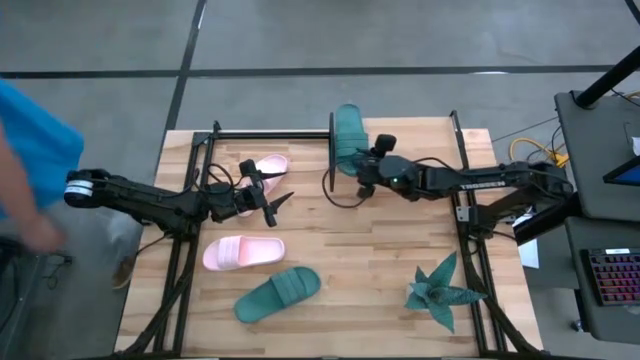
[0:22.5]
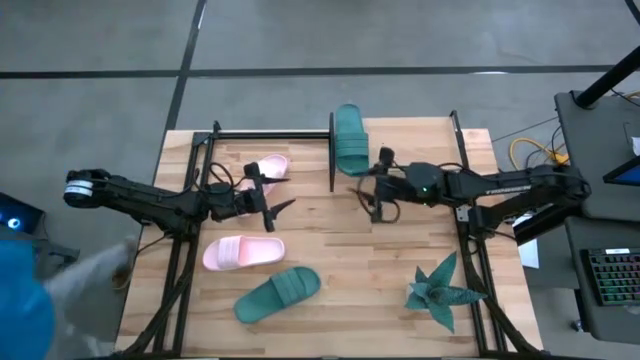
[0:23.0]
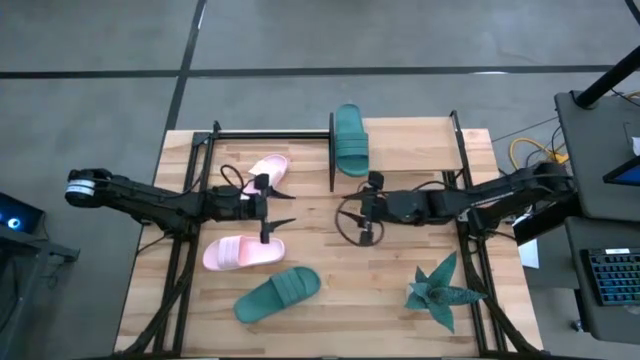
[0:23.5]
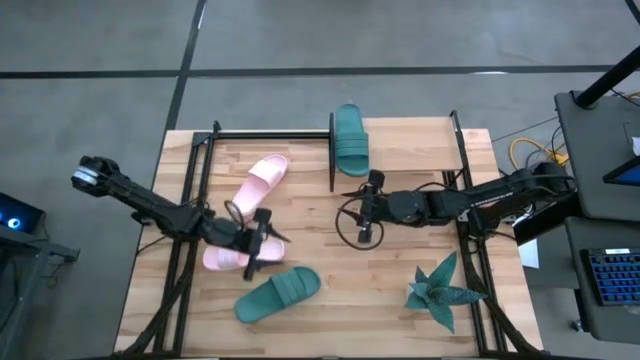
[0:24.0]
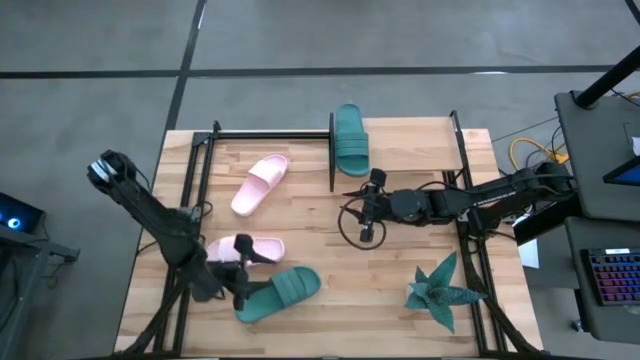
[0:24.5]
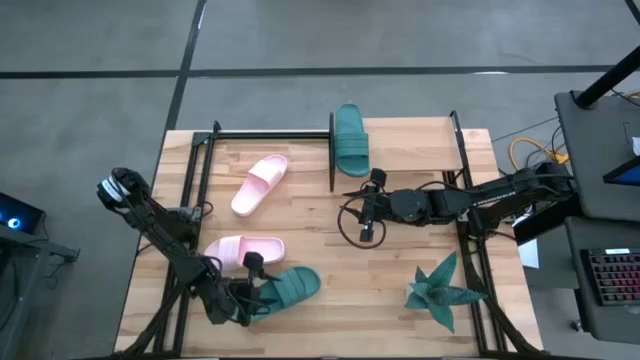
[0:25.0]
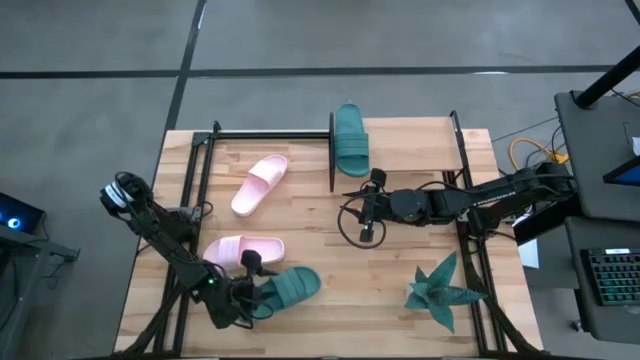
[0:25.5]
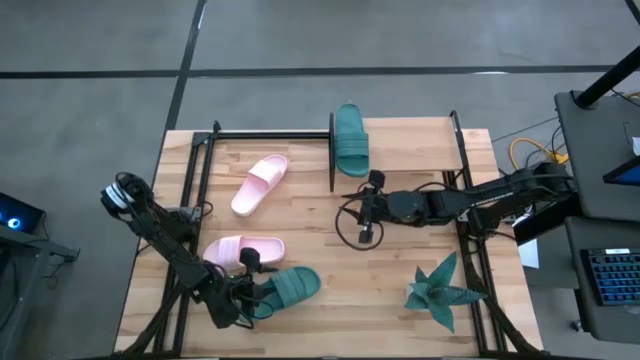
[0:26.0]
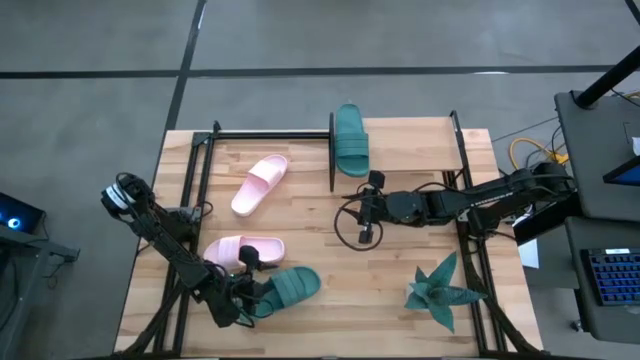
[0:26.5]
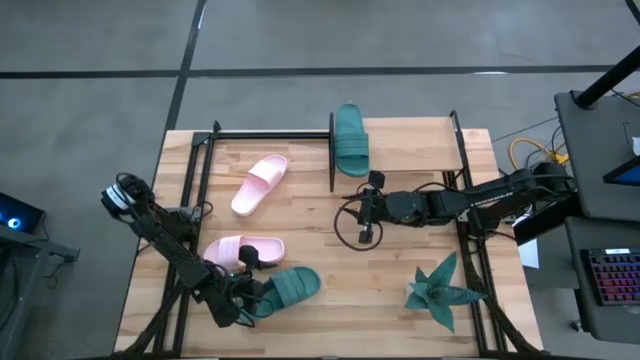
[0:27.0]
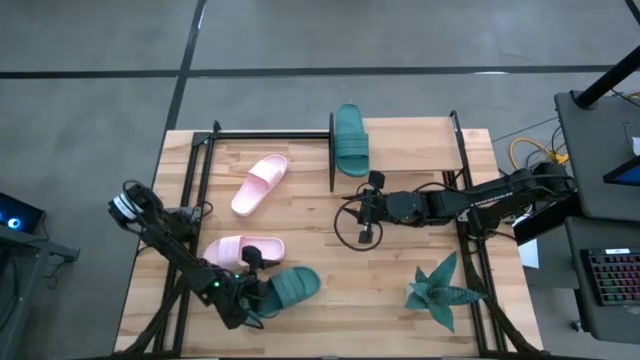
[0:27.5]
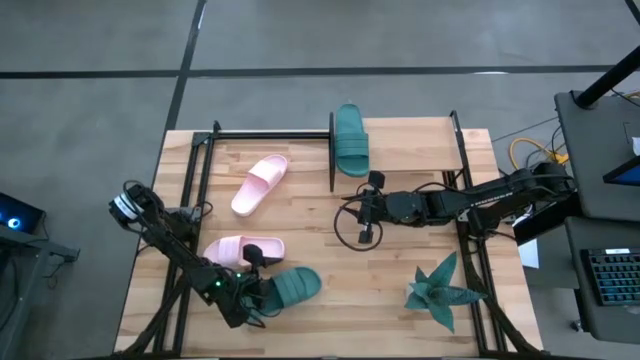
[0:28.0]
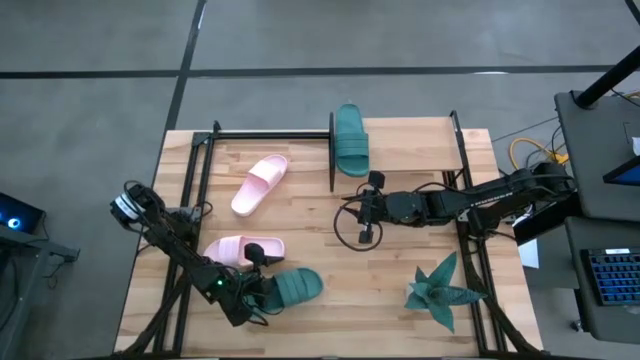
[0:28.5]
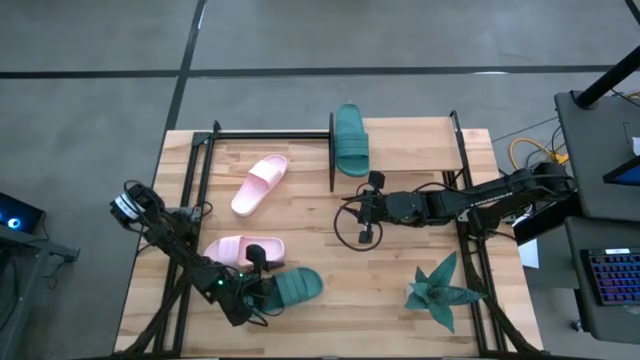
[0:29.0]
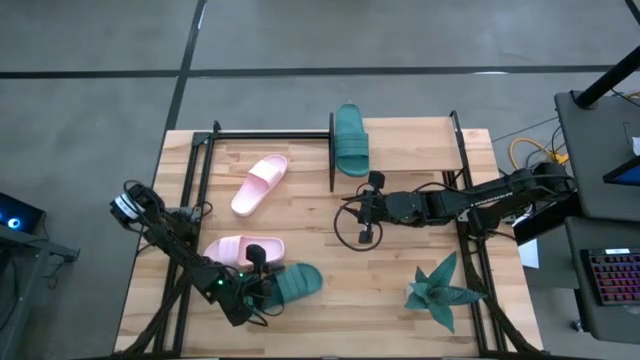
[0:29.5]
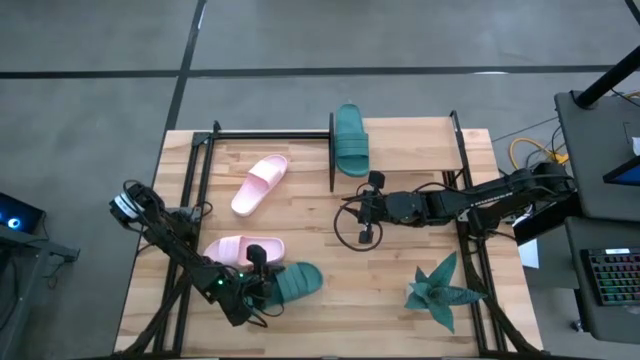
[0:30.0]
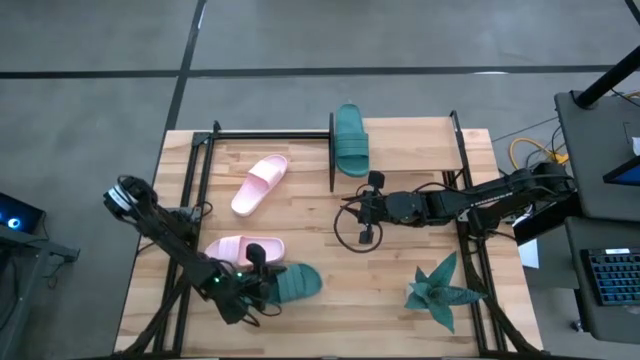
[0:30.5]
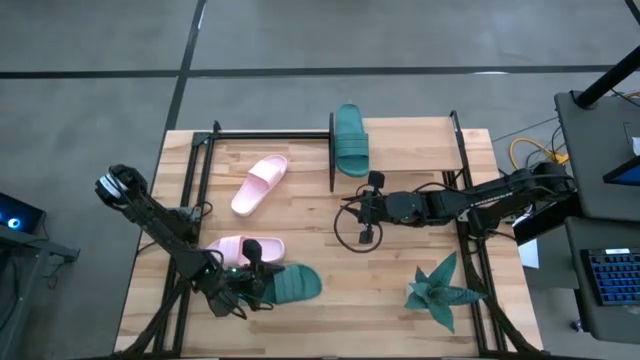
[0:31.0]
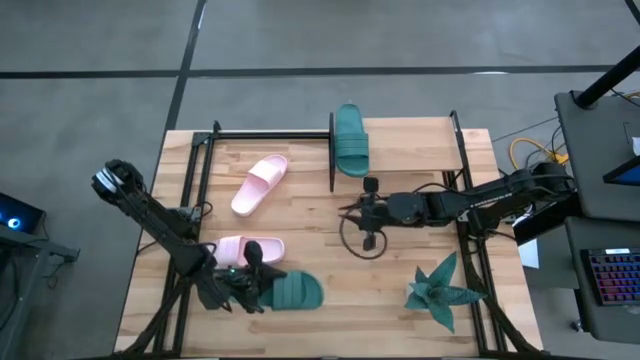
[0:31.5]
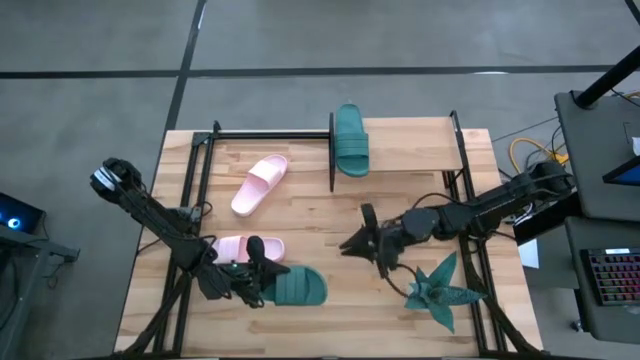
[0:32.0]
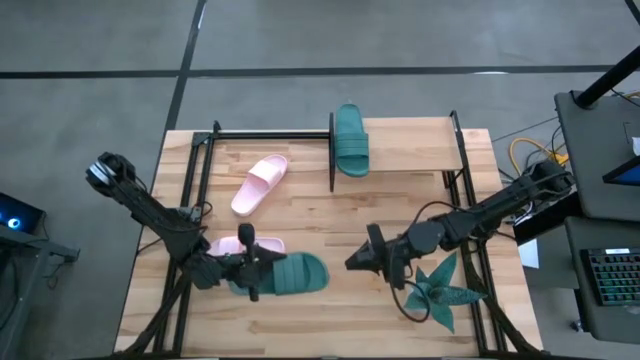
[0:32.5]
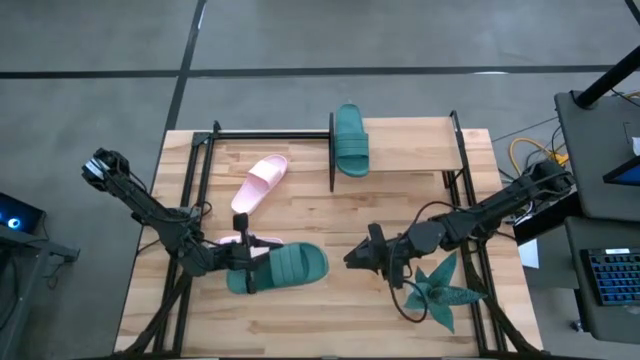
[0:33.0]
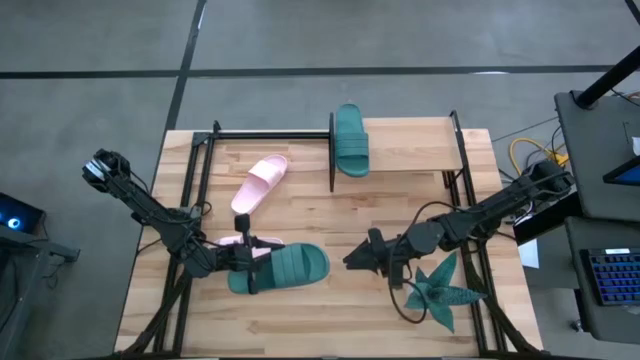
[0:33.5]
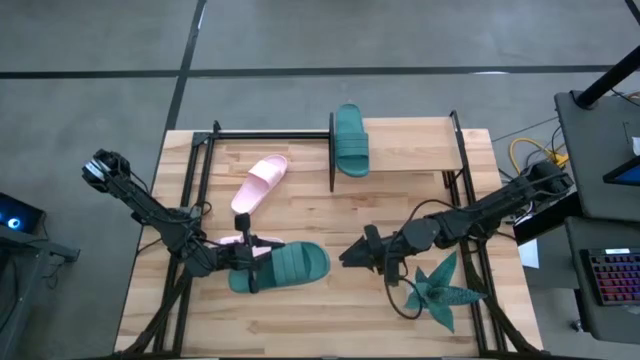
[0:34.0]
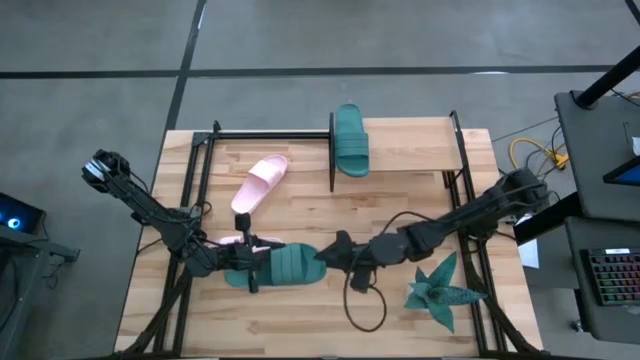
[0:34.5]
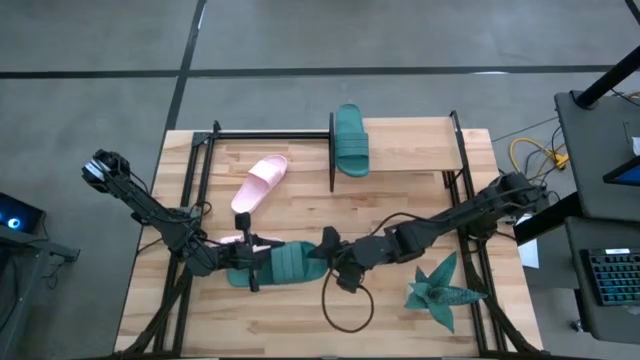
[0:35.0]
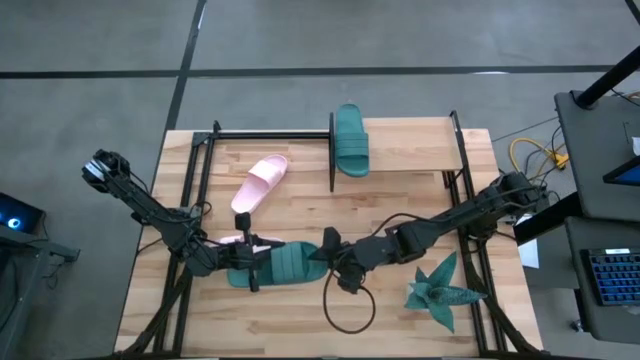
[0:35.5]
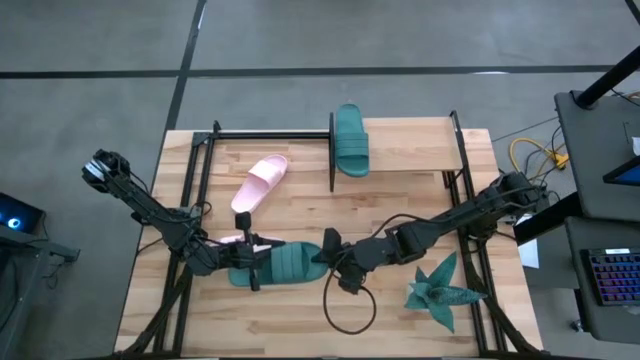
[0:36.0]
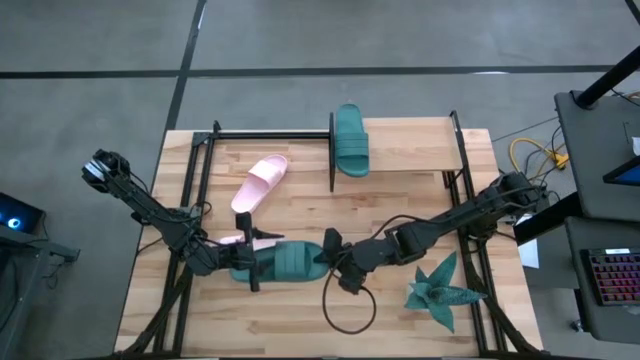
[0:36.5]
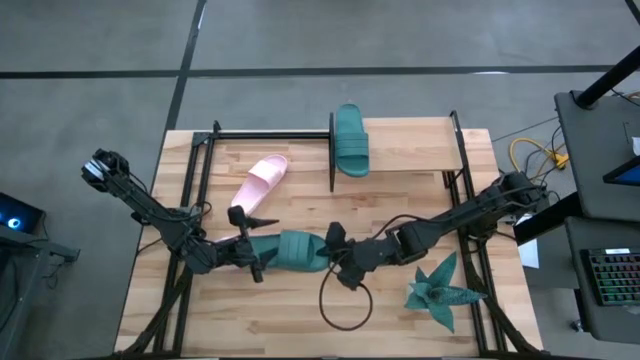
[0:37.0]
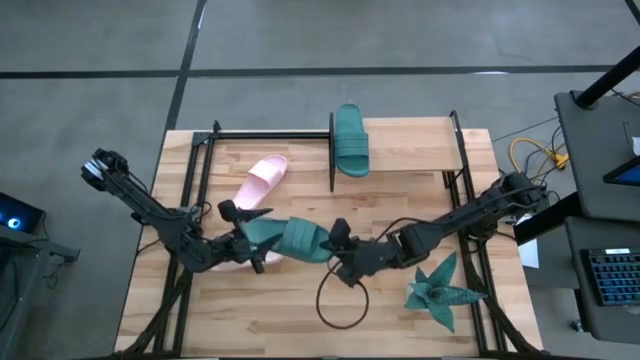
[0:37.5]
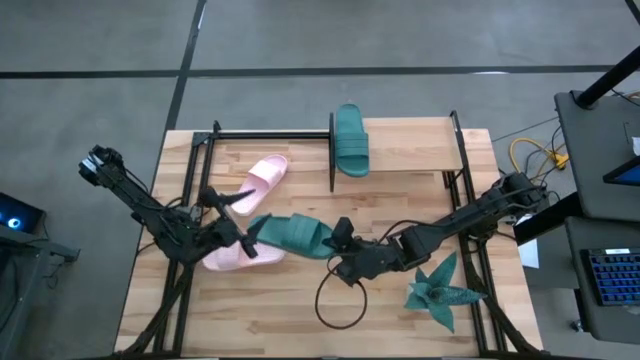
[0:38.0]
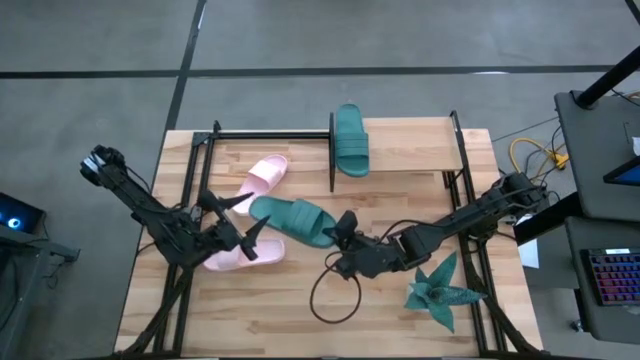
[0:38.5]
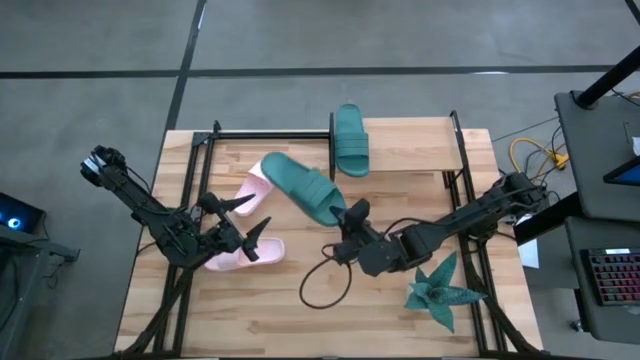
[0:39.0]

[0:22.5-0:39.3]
Task: Pick and place slides into the shelf
Put the green slipper on the shelf

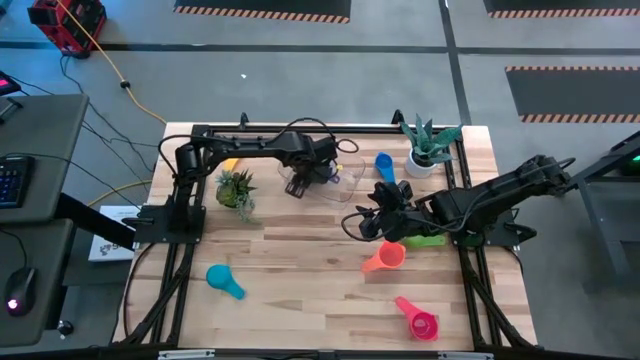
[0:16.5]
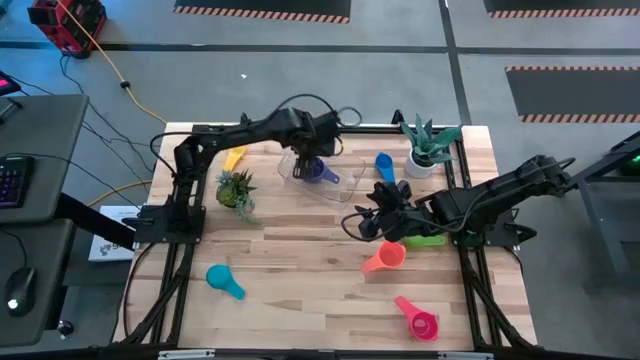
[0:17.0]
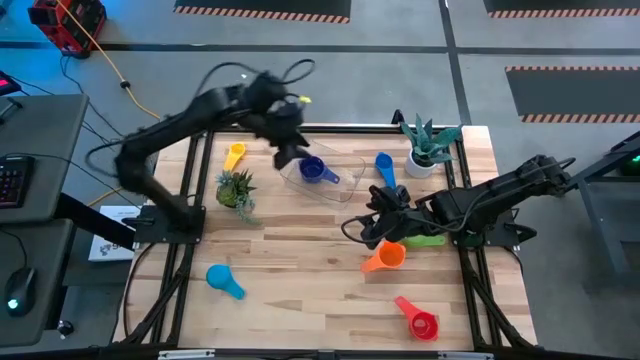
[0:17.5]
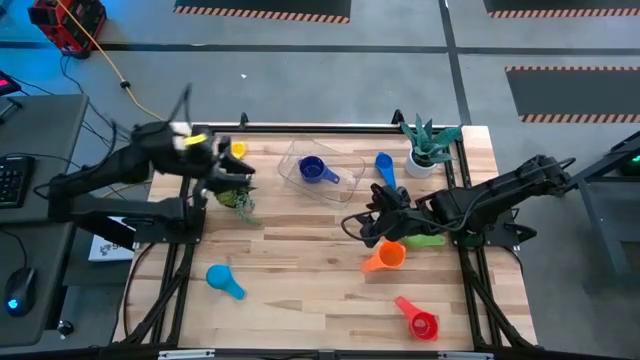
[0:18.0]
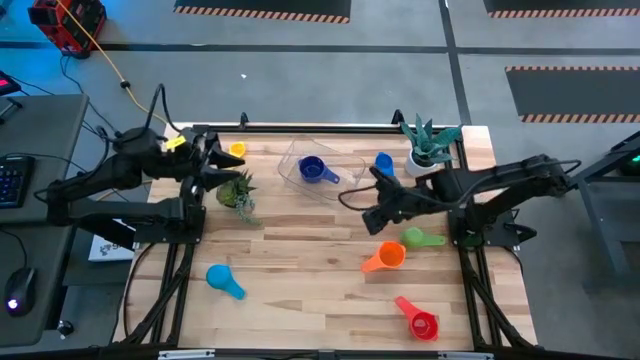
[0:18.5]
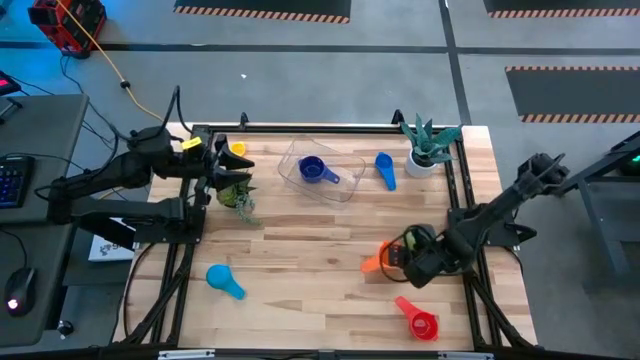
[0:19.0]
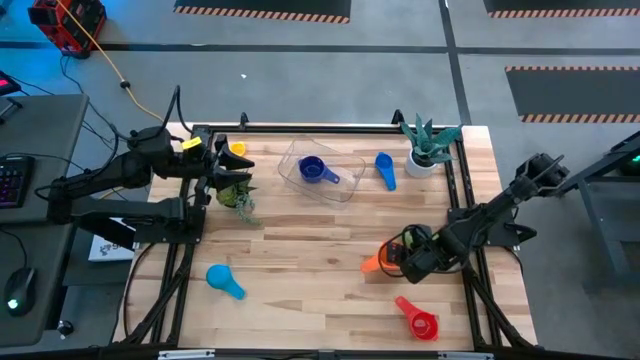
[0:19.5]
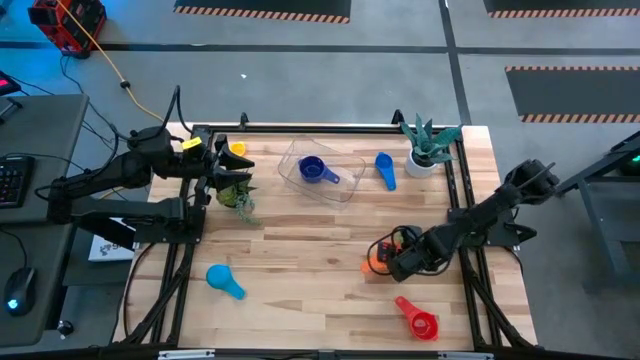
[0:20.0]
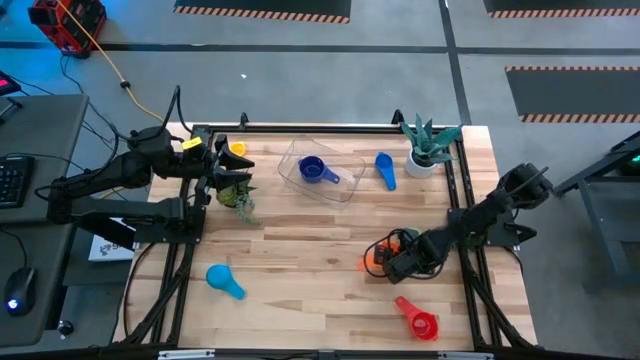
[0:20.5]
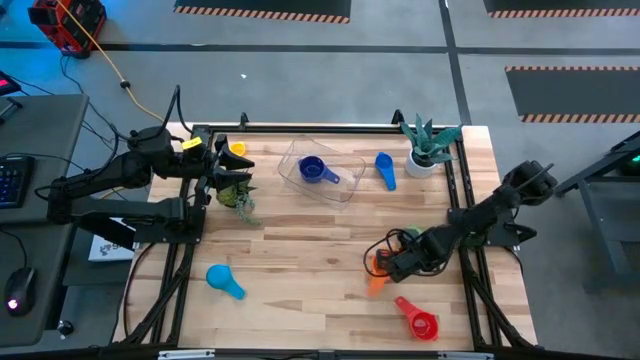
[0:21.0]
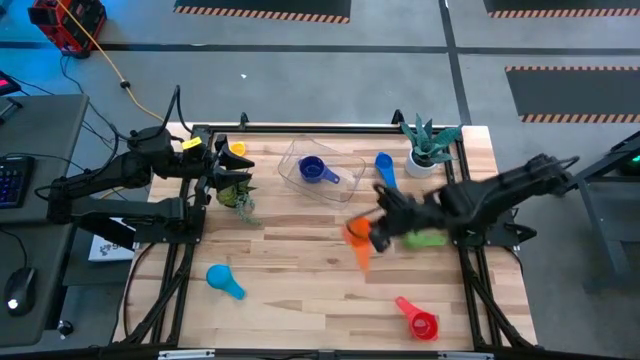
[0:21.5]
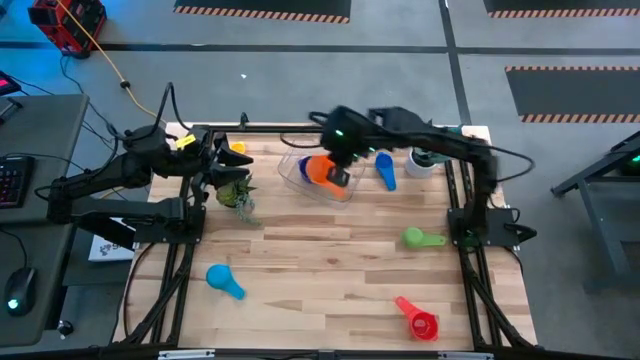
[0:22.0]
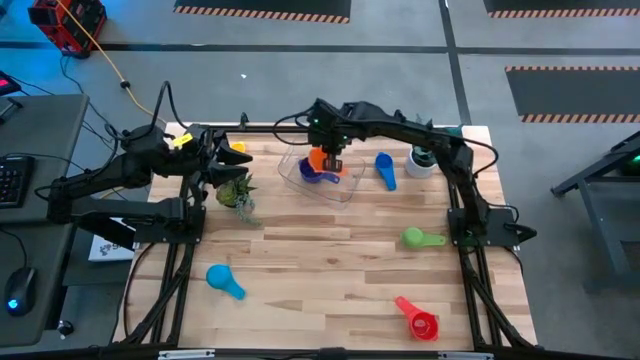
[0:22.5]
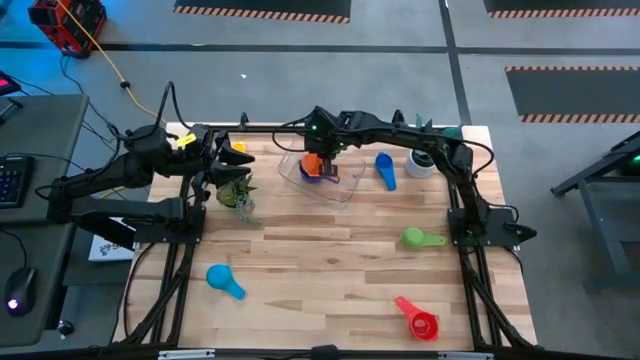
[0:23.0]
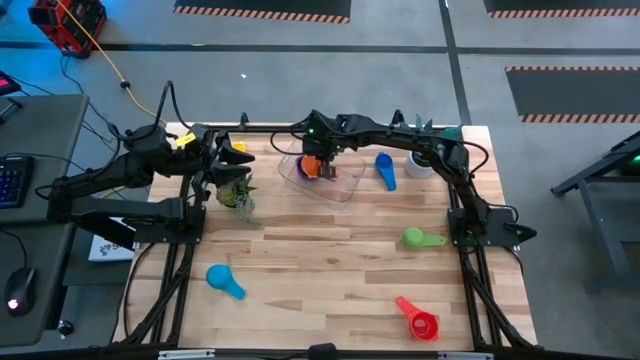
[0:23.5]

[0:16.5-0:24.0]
Task: Nest measuring cups in basket
Stack the orange measuring cup on top of the dark blue measuring cup on the transparent bin
